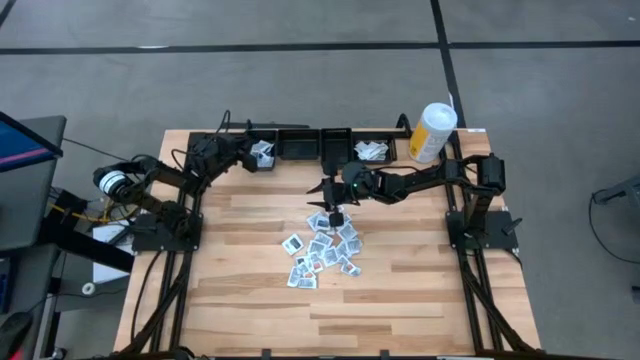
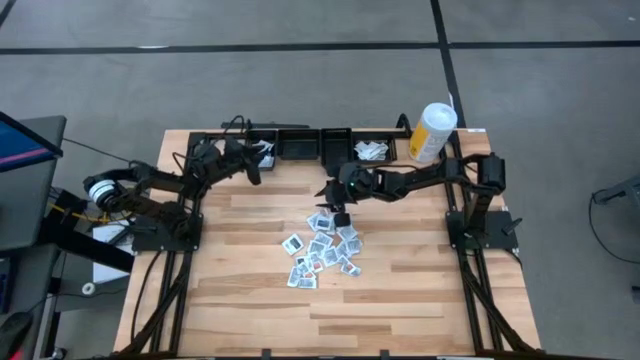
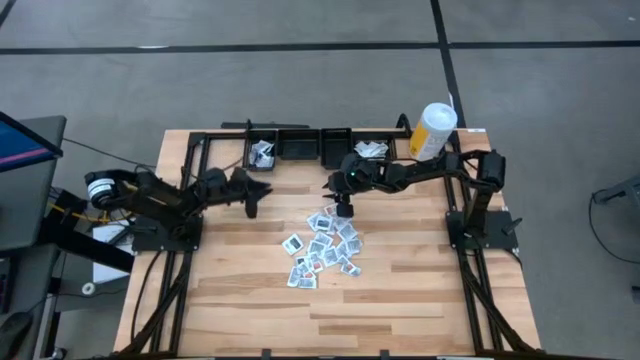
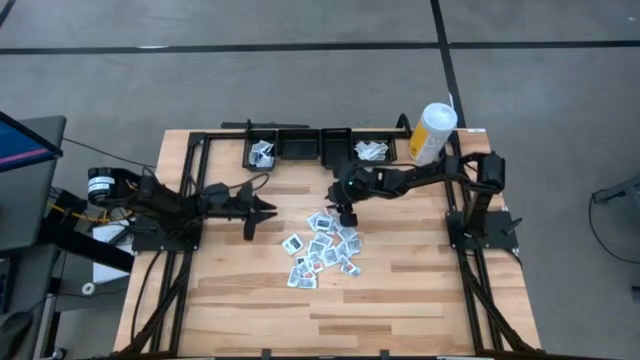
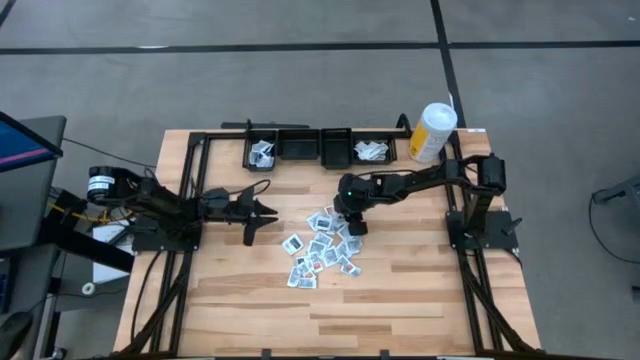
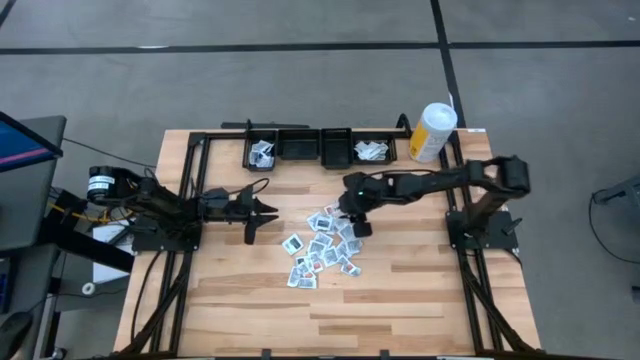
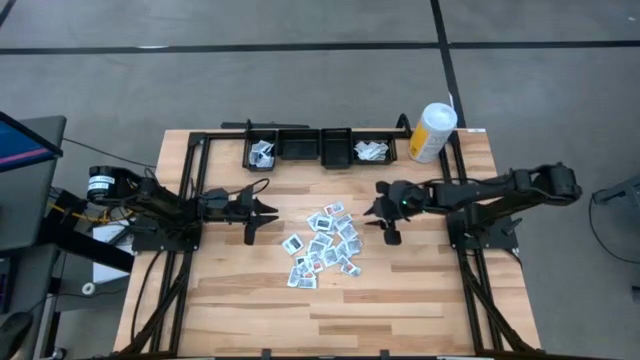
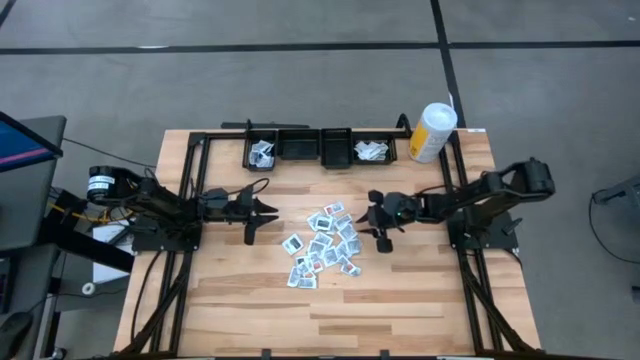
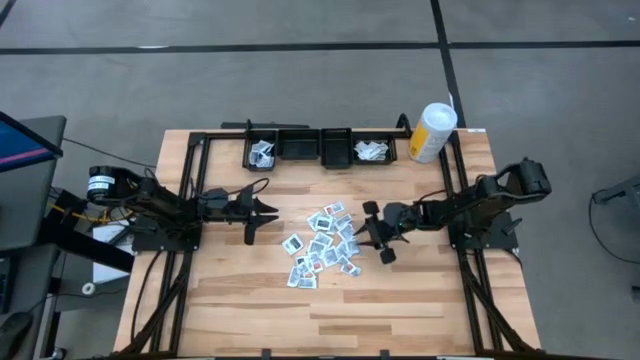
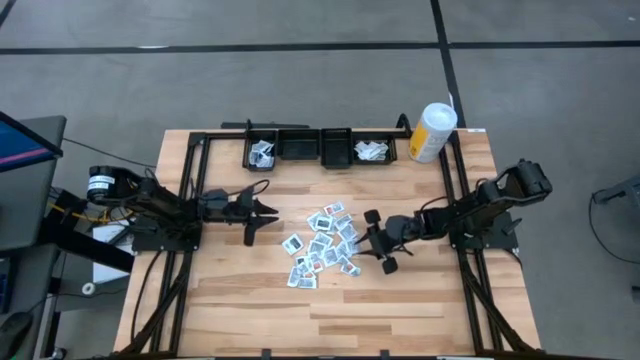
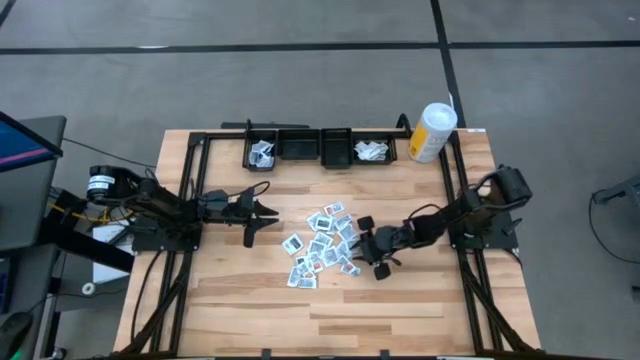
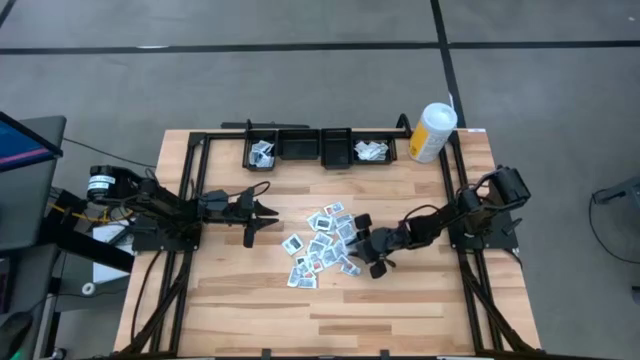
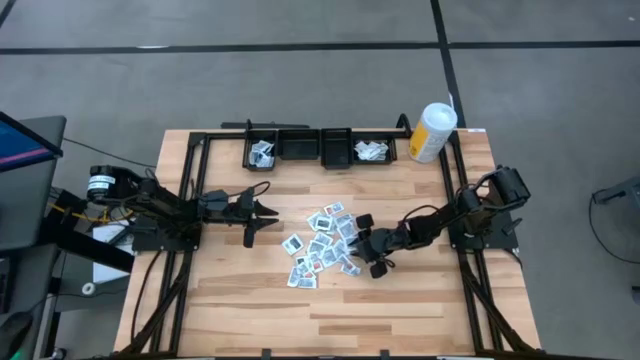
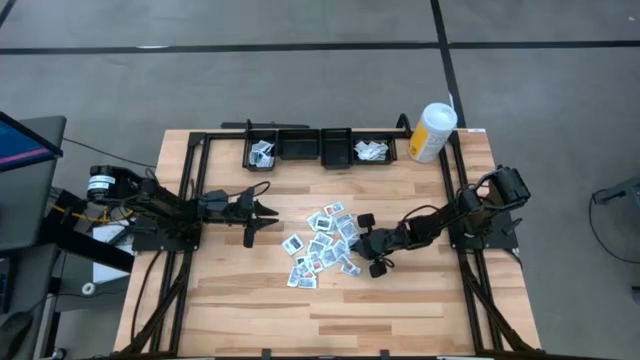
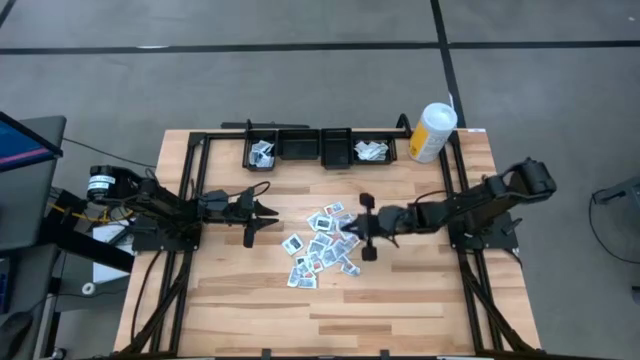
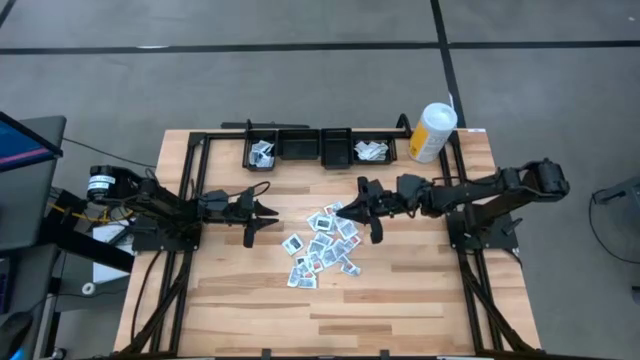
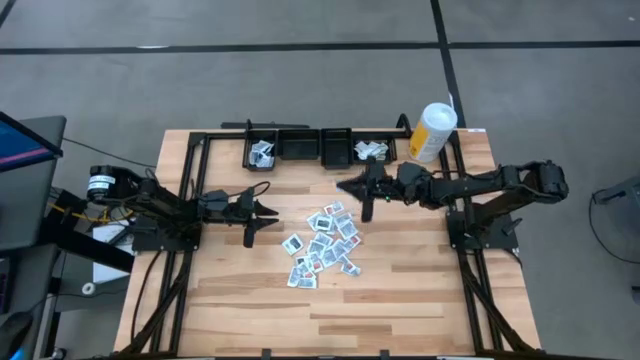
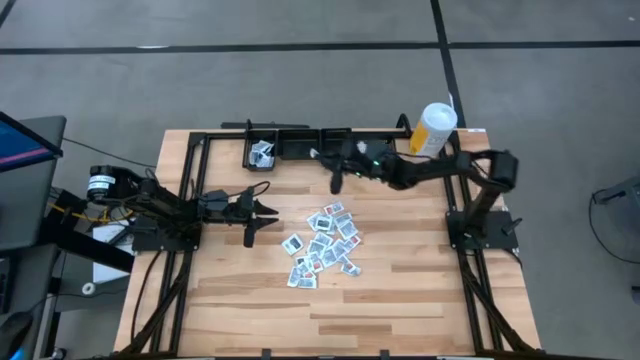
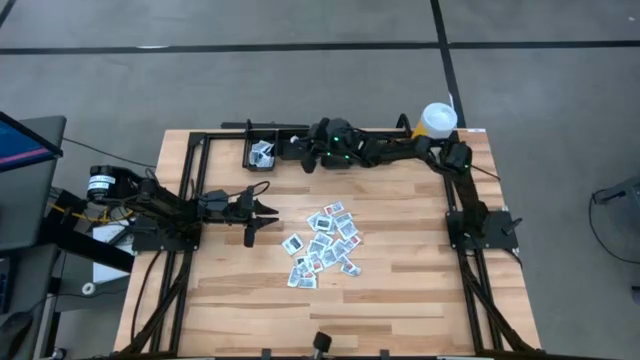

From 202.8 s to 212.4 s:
Task: Pick & Place First Aid Supplies
Put the black towelette pack into the middle left black bin

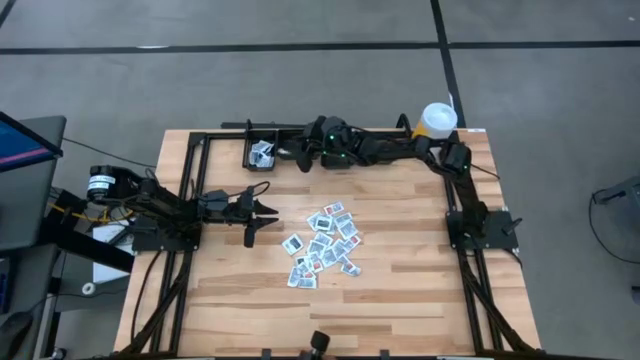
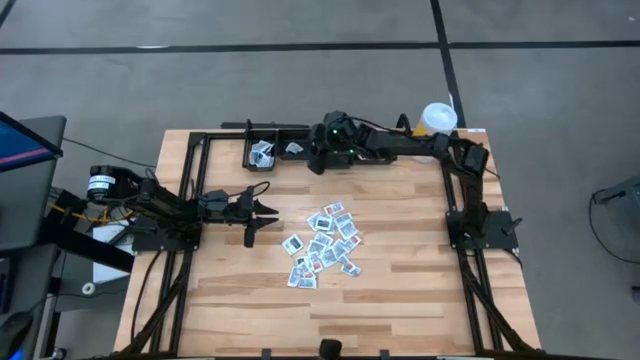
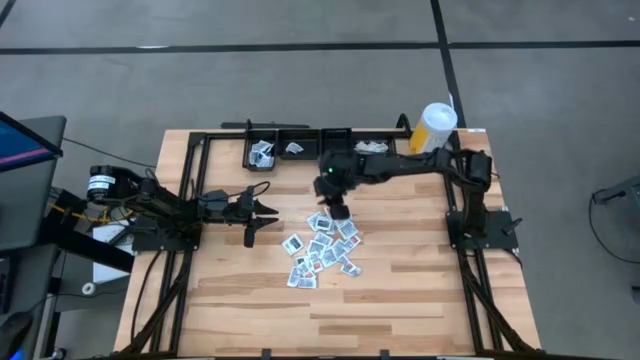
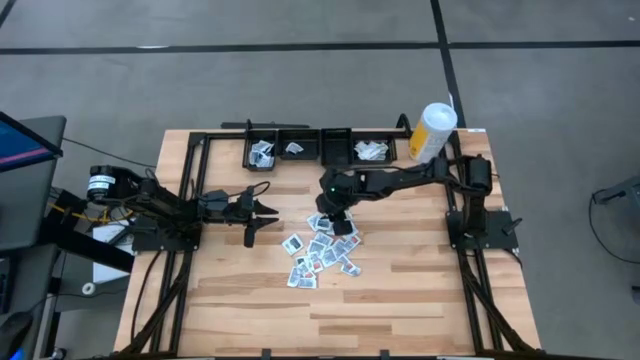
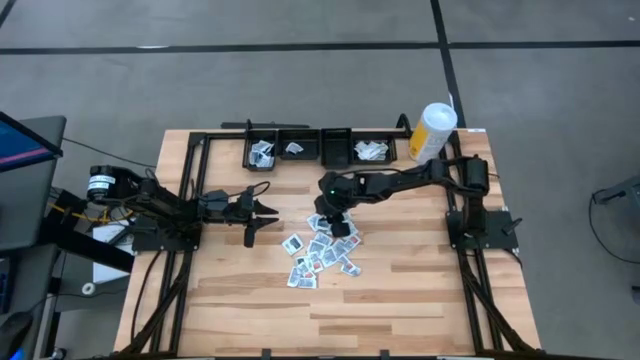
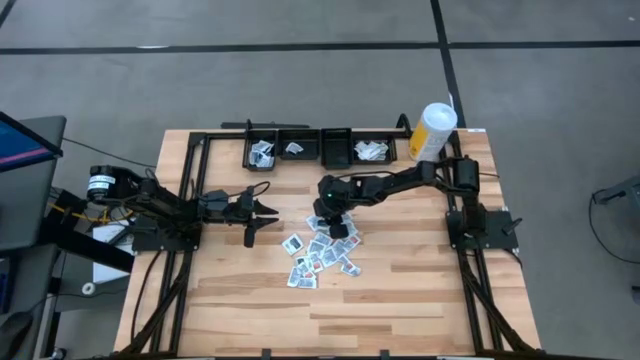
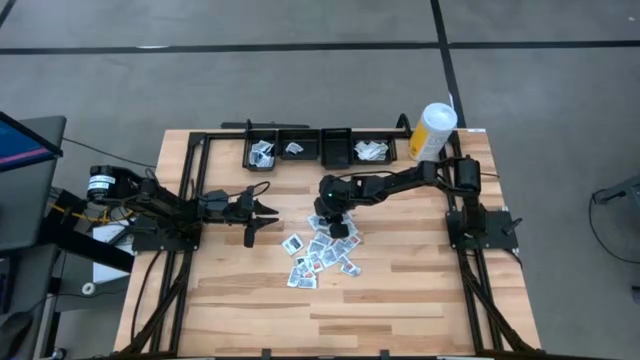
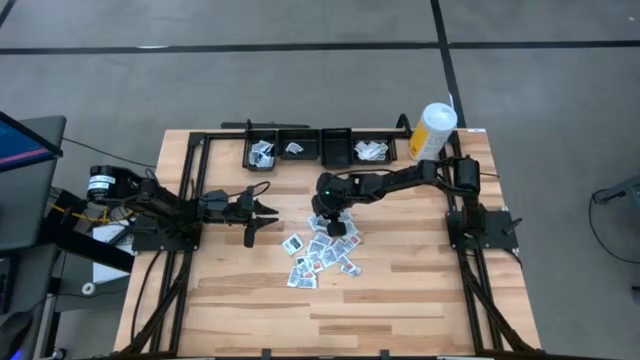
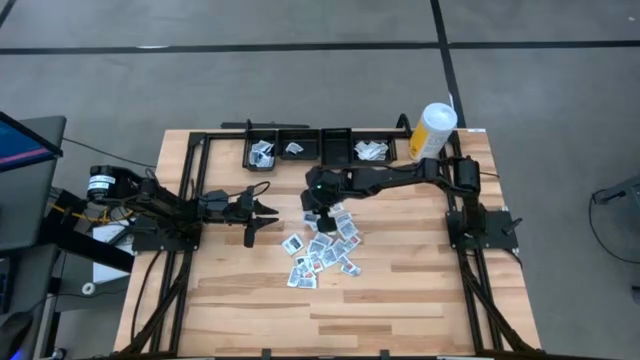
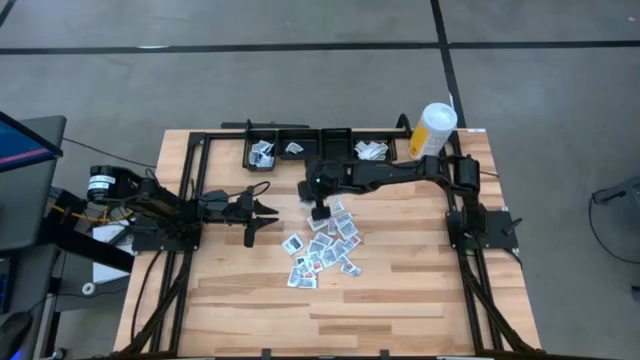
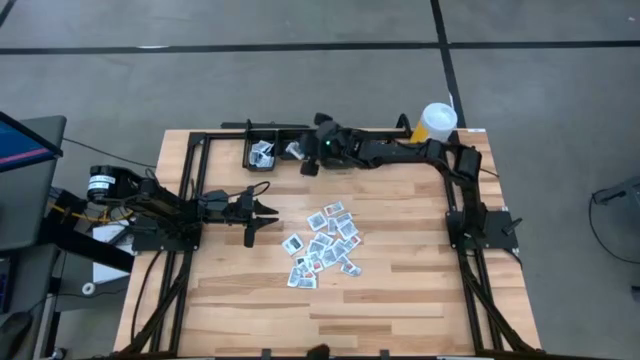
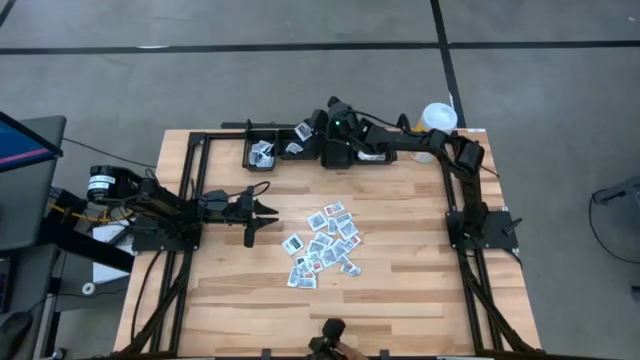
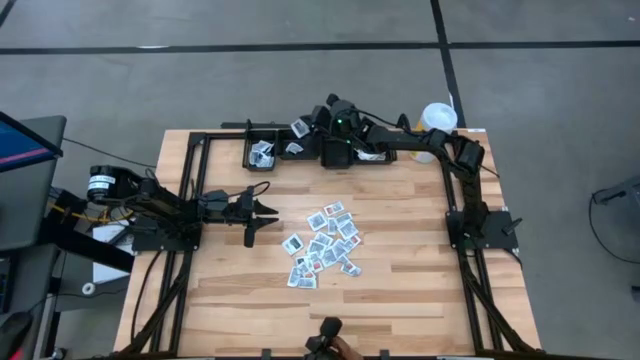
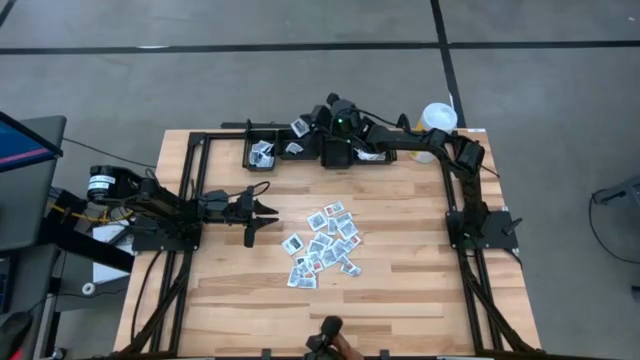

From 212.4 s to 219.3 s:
Put the black towelette pack into the middle left black bin

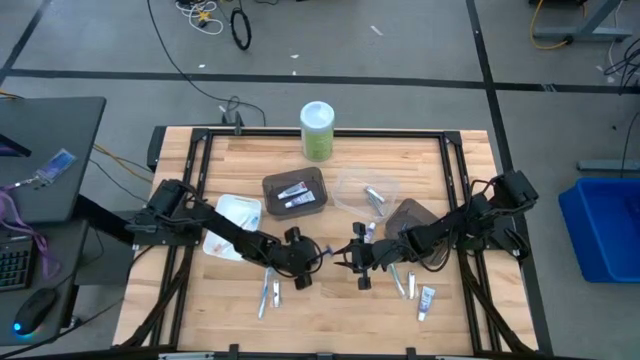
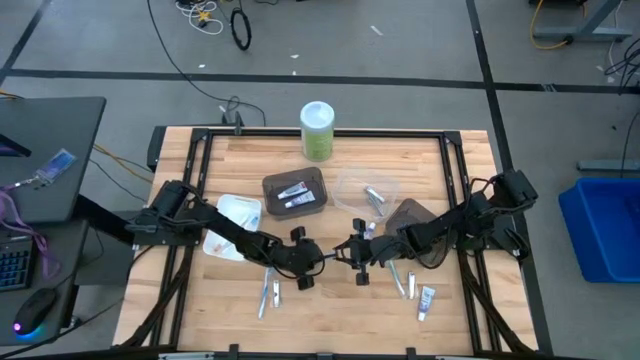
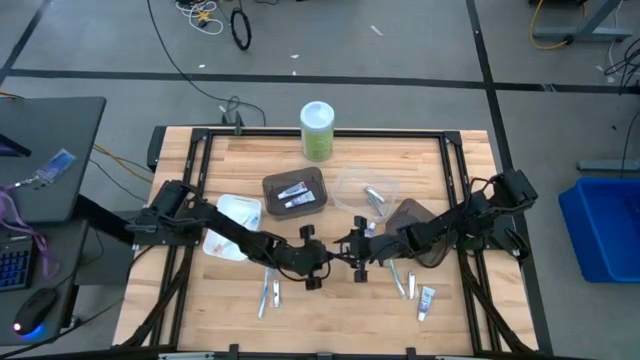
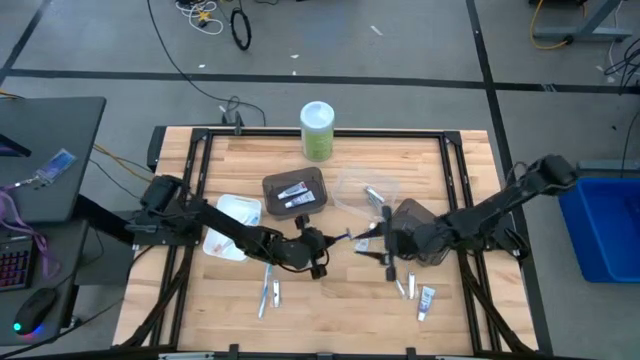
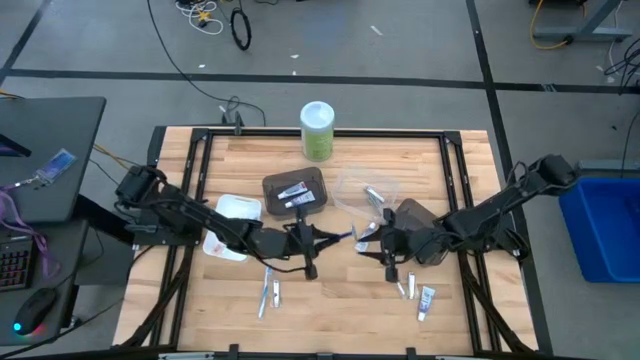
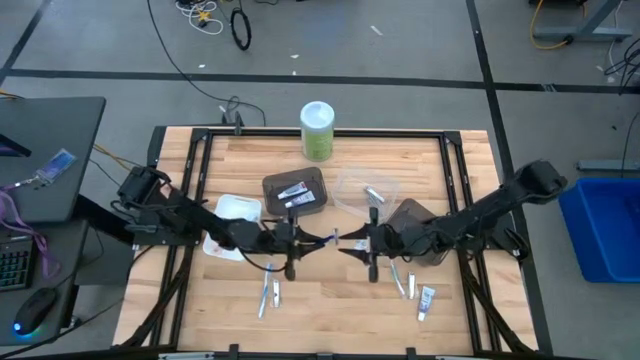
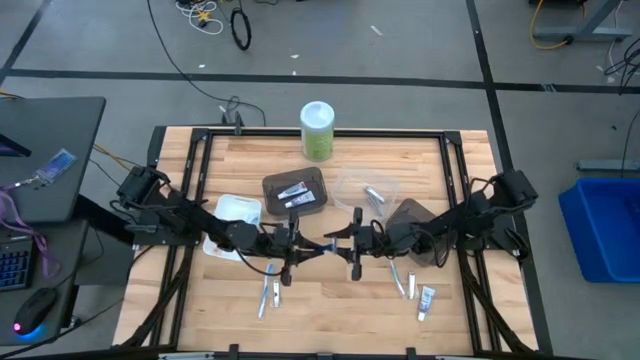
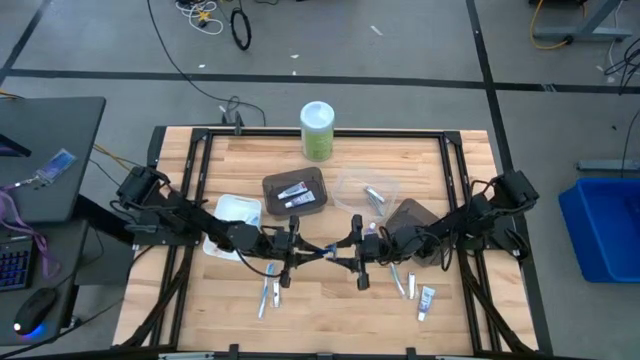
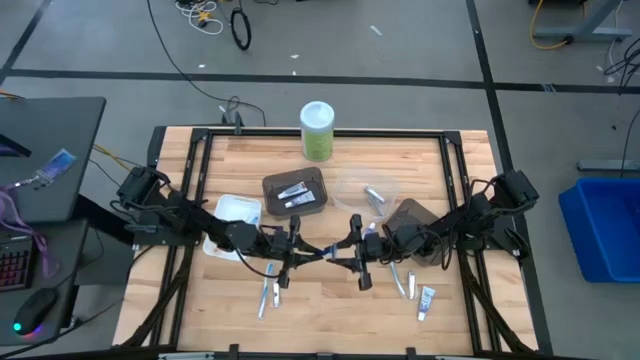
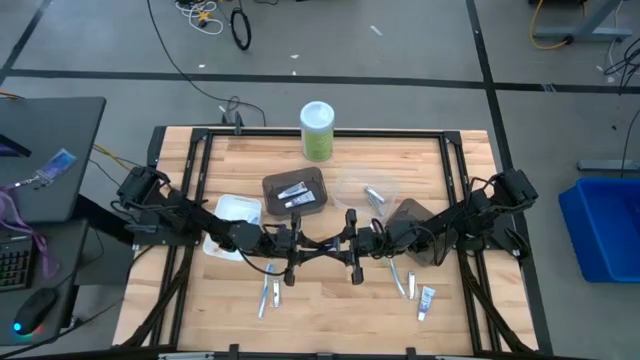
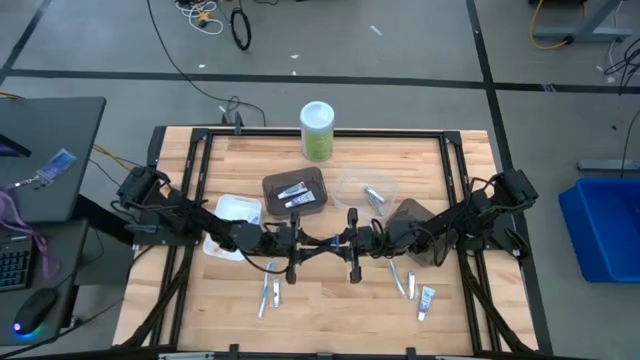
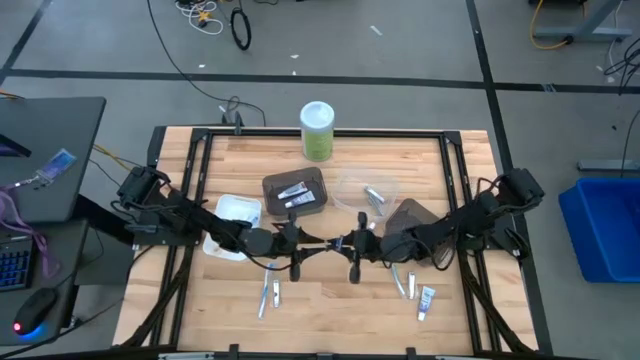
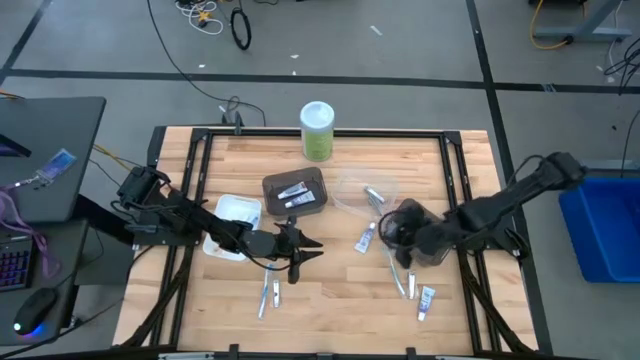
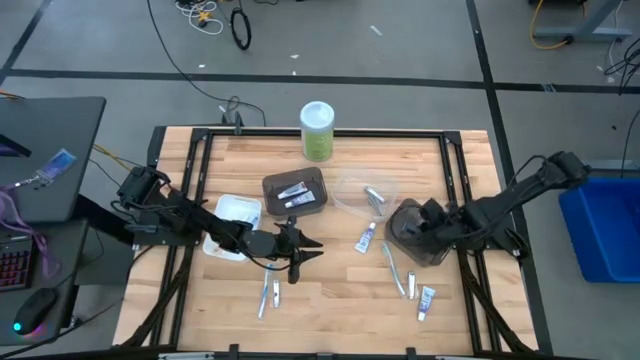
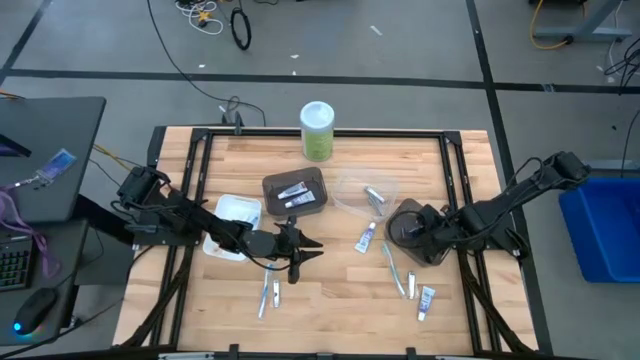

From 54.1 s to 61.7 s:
Task: Pick & Place Travel size toiletries
Put the razor into the right black bin
